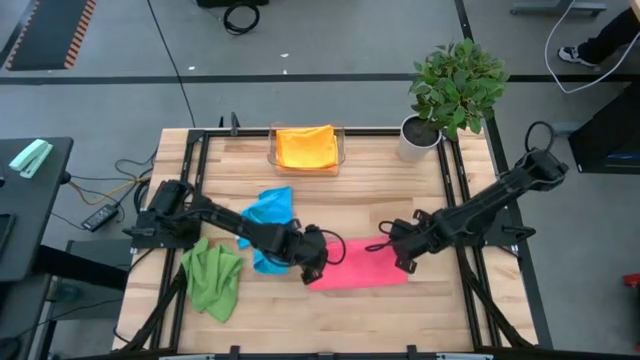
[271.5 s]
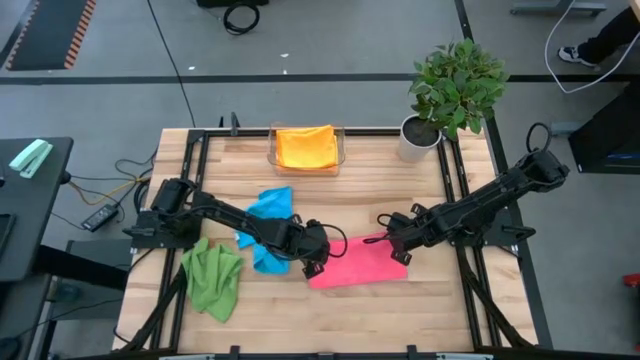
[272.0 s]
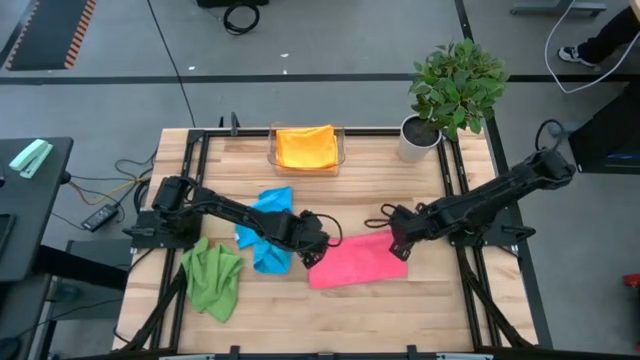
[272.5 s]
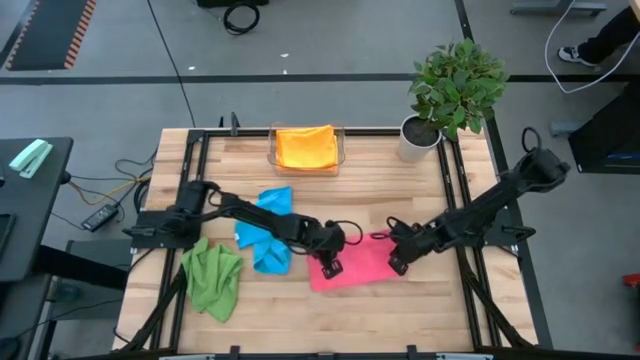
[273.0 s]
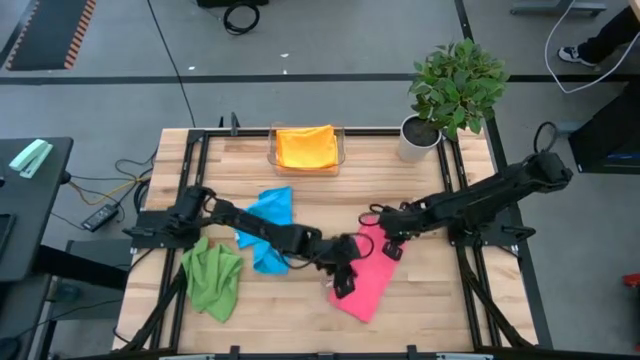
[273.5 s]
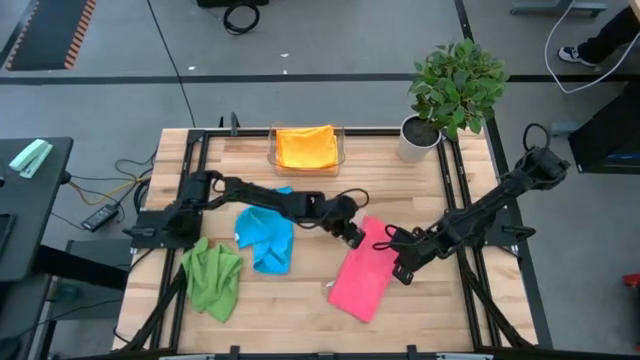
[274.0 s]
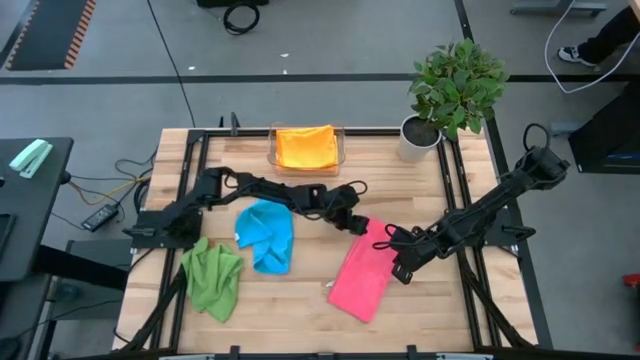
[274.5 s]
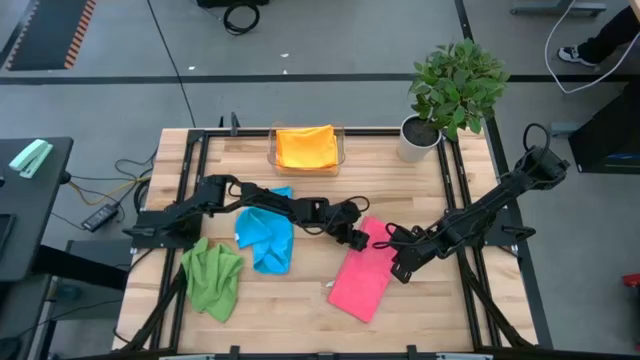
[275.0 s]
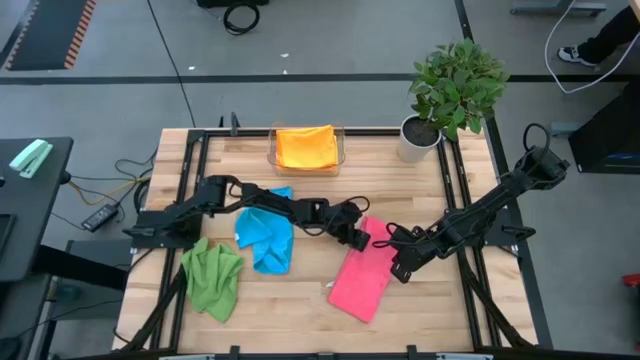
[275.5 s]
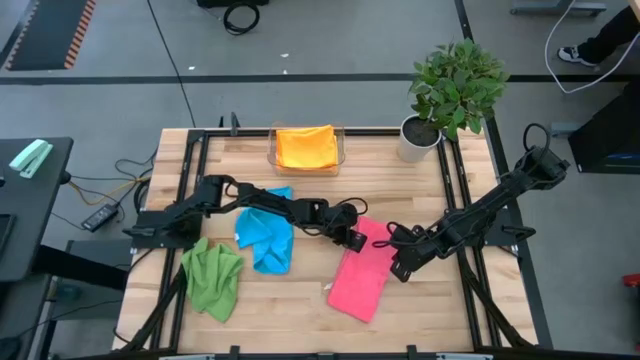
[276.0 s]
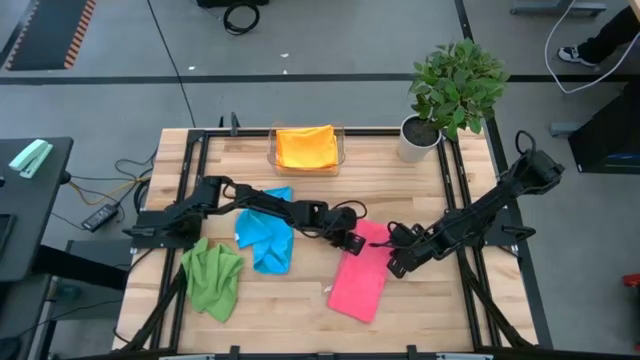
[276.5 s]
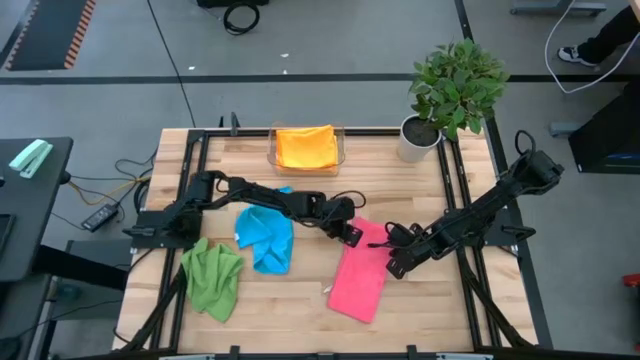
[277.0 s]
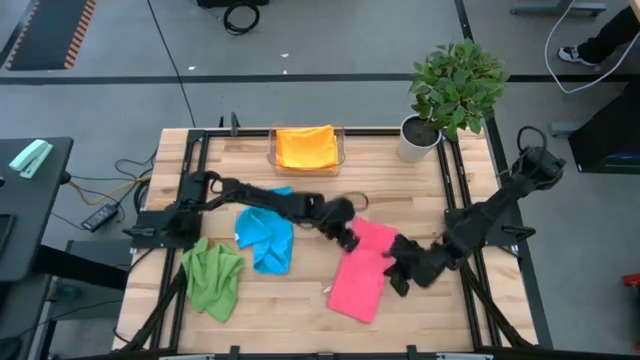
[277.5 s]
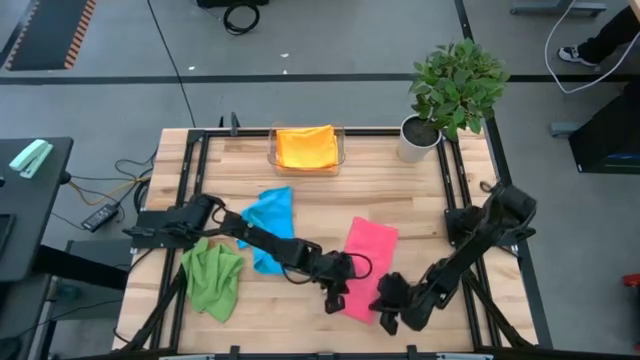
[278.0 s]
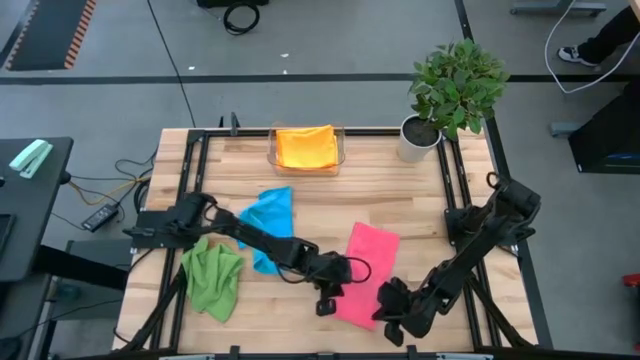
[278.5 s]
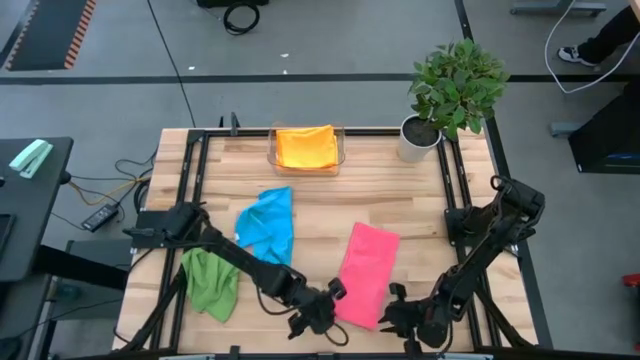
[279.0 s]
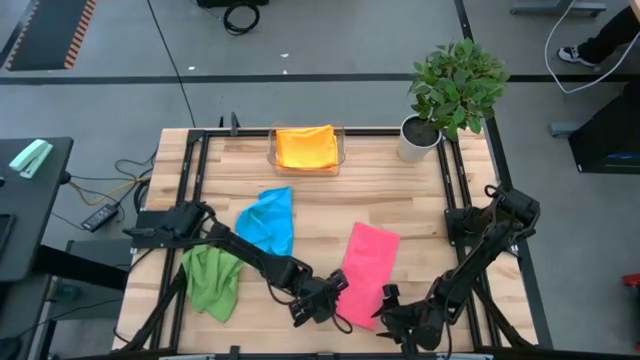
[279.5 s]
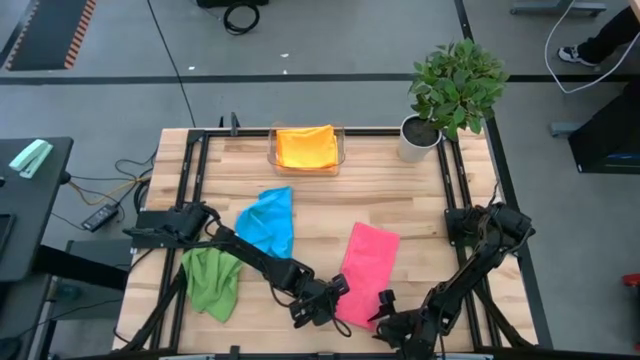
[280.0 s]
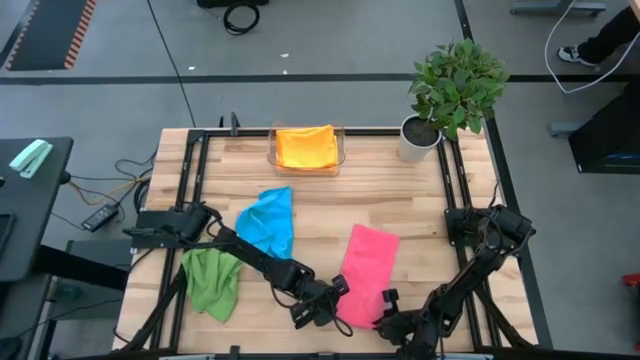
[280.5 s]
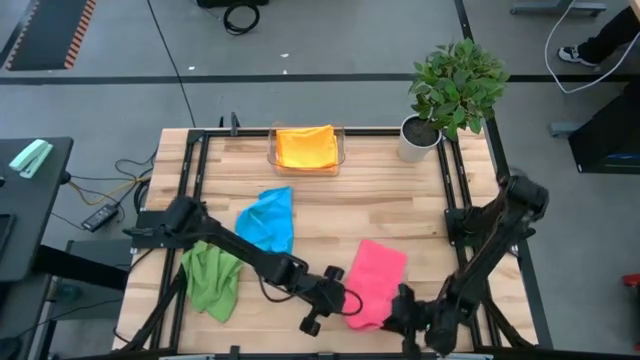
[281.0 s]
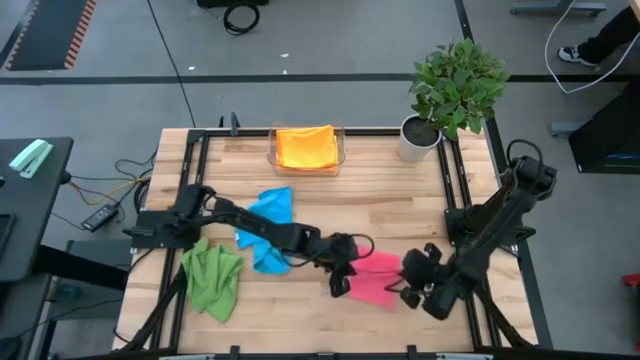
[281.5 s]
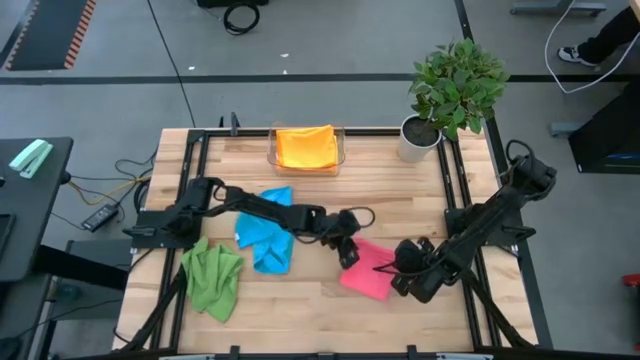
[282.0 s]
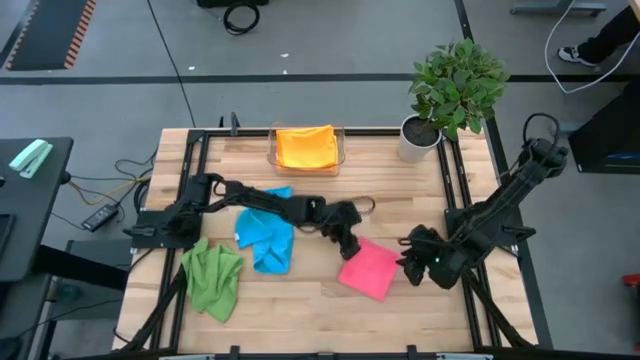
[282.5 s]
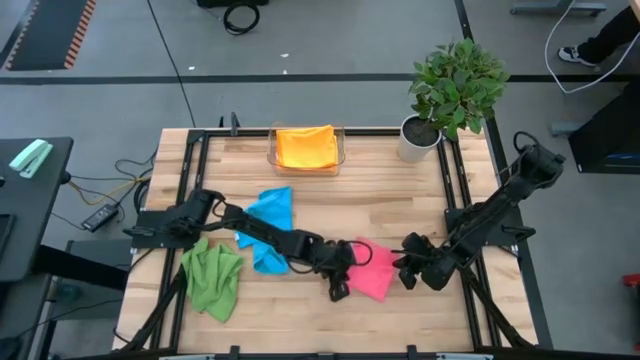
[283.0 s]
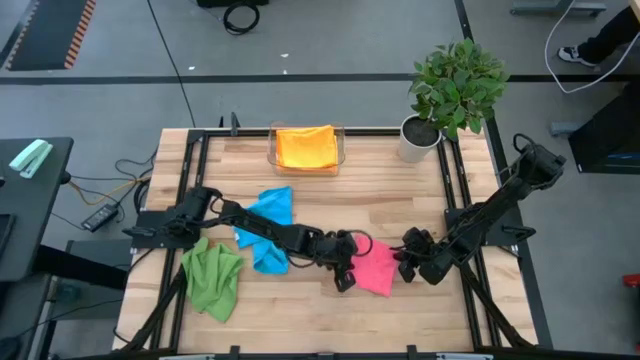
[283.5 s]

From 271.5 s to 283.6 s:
Task: Fold microfiber towels
Fold the pink microfiber towel

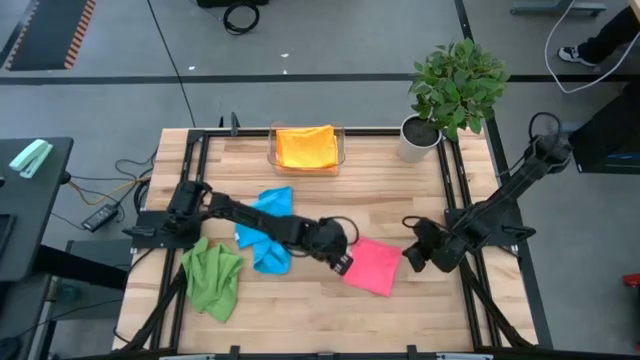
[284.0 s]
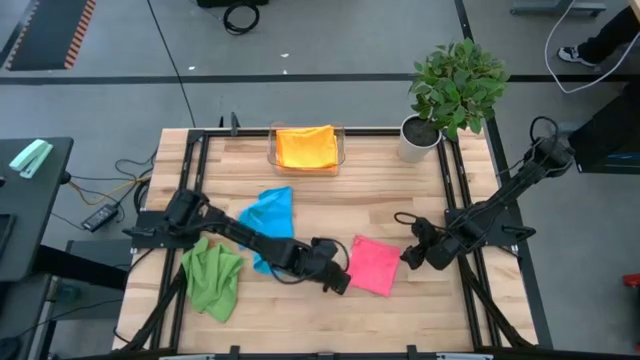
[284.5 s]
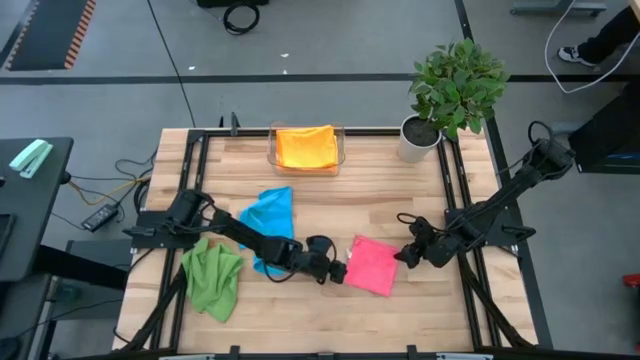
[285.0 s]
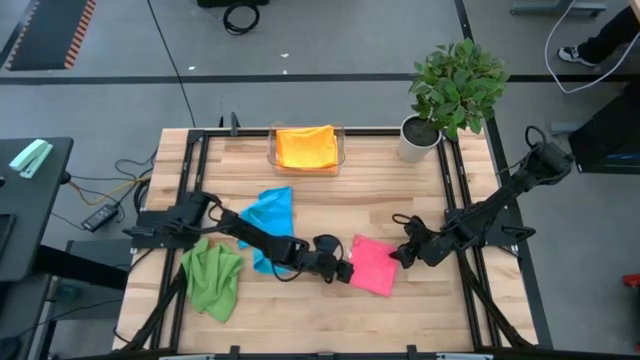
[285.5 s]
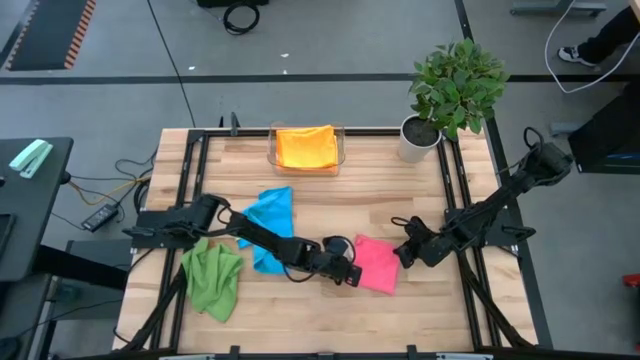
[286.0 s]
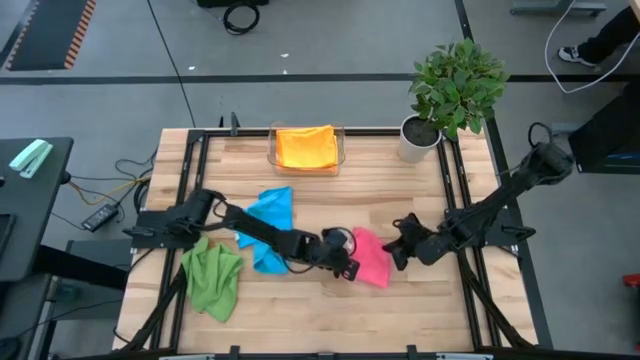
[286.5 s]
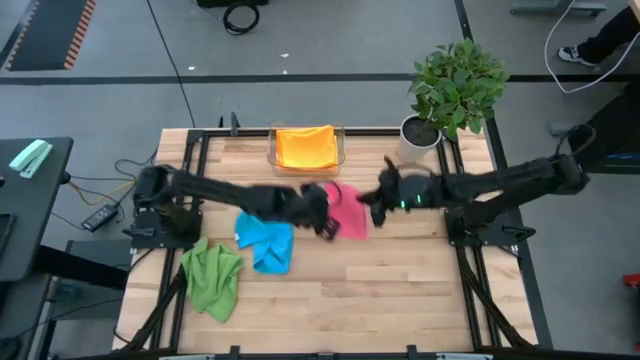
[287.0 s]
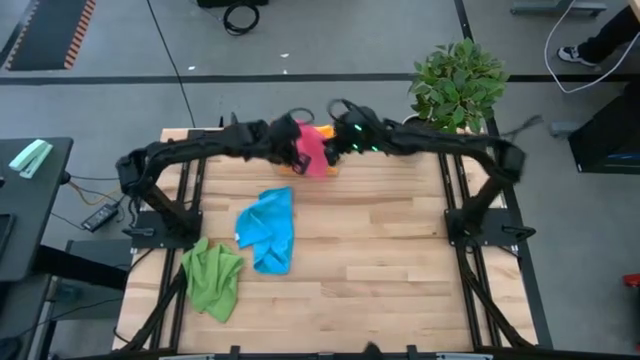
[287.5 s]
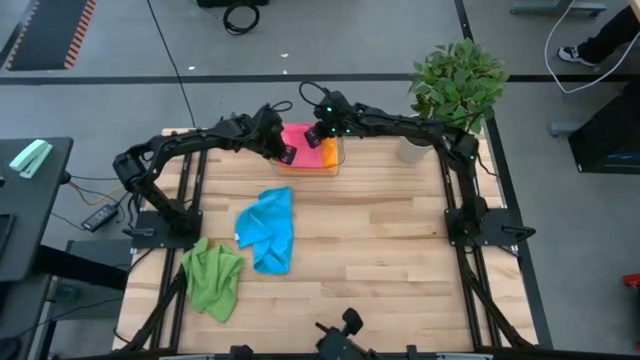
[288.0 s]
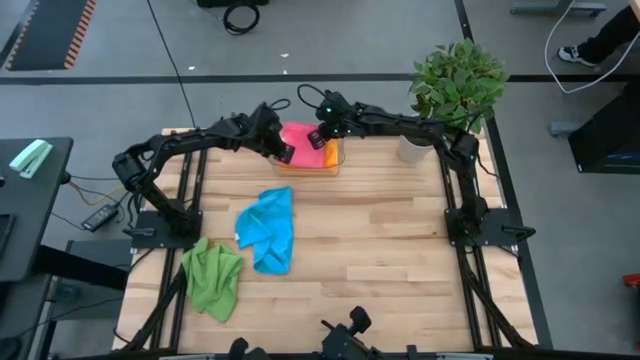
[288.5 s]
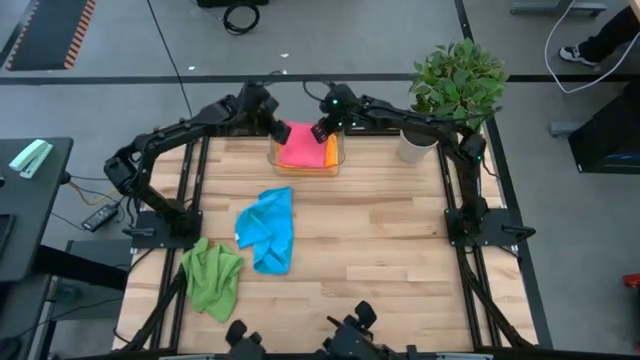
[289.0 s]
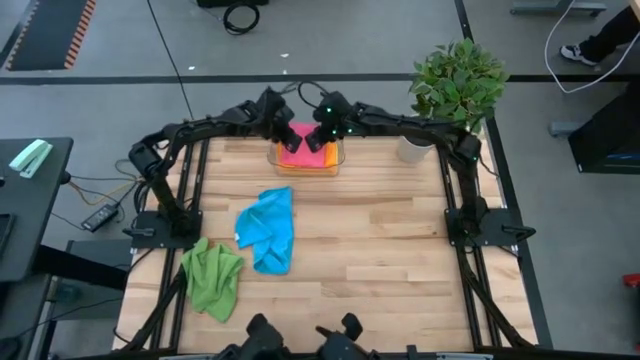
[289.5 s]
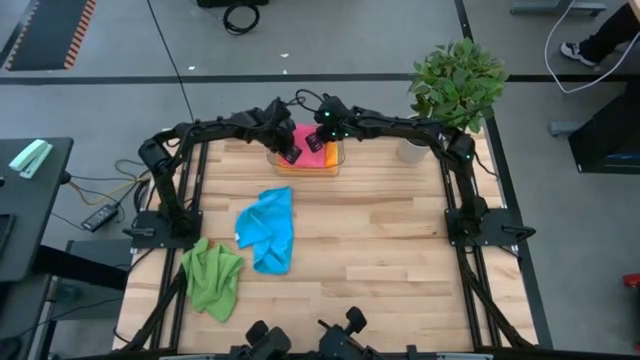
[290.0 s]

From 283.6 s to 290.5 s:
Put the pink microfiber towel into the transparent bin

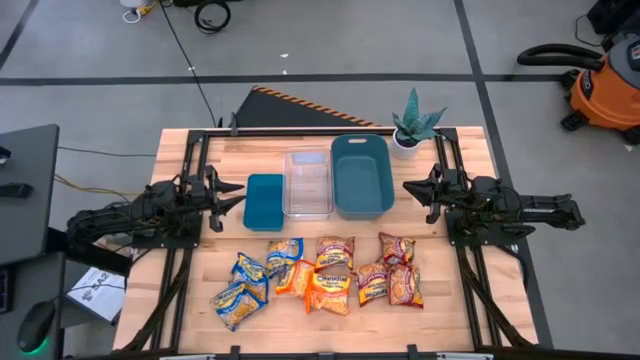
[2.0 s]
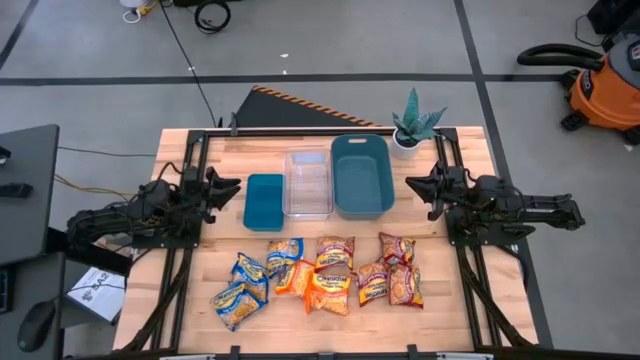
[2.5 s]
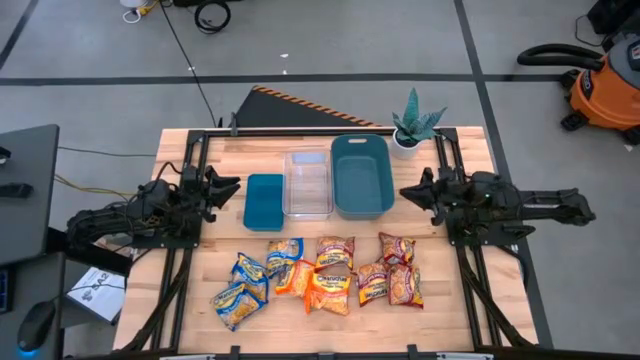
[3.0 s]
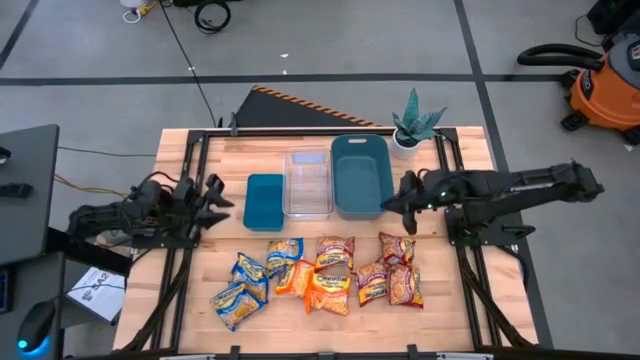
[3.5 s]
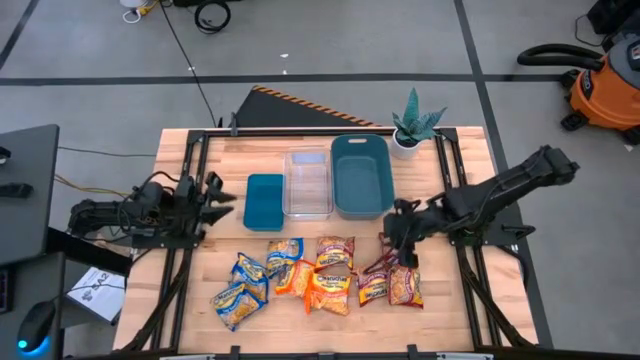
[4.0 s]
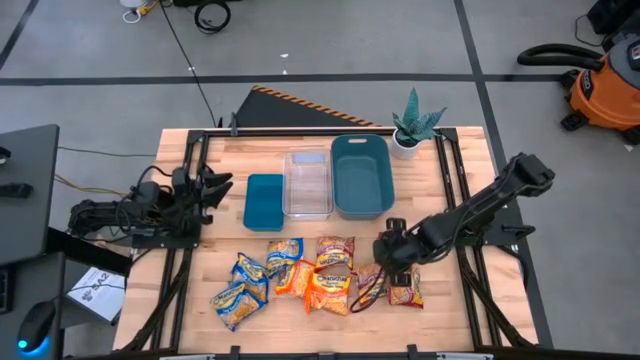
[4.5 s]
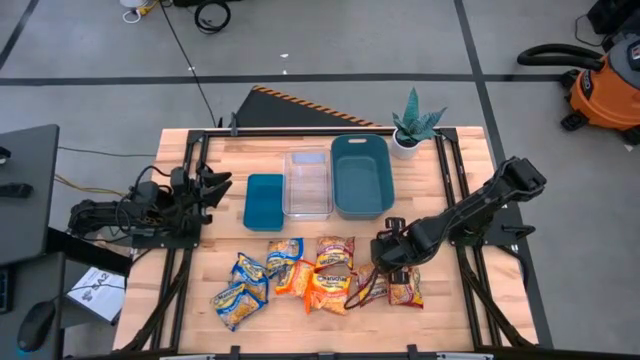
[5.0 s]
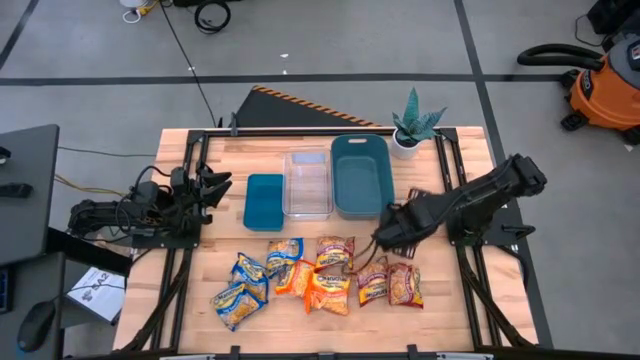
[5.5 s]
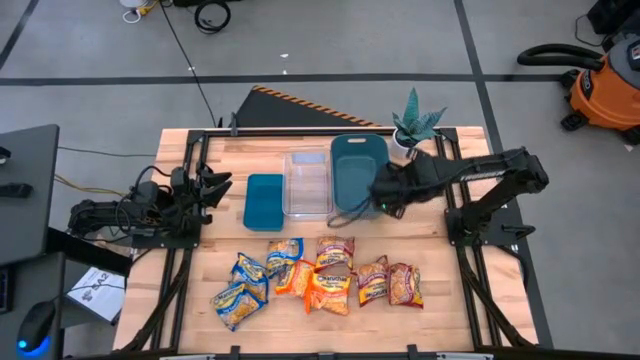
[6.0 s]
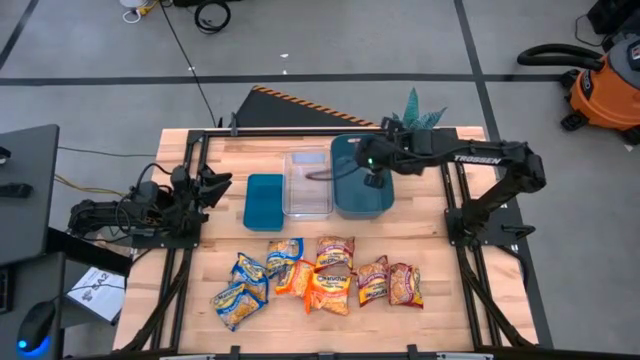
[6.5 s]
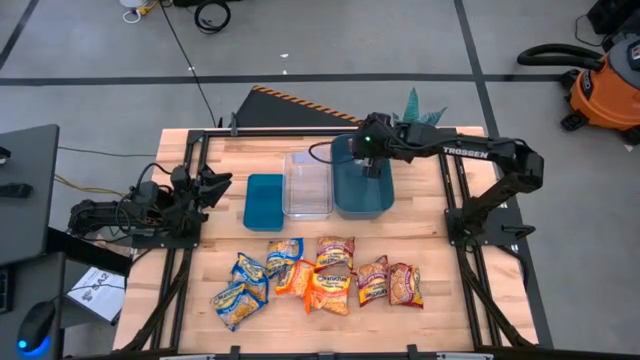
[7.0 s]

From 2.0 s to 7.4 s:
Task: Sort Maruchan noodles
Put the red noodle pack into the green bin
